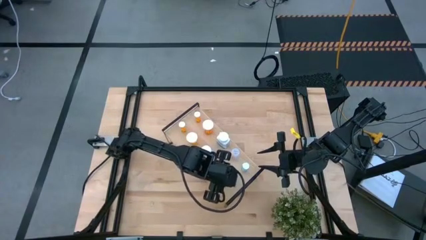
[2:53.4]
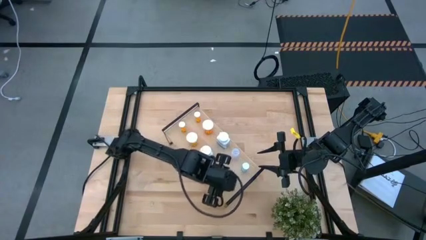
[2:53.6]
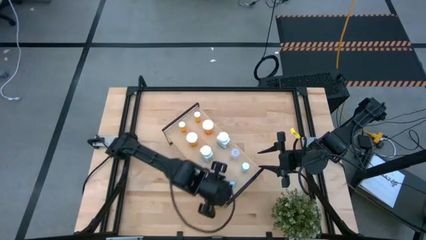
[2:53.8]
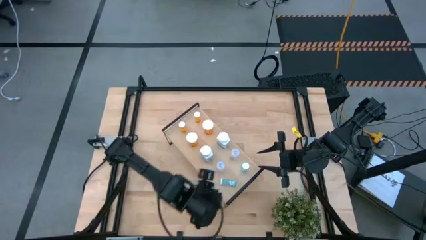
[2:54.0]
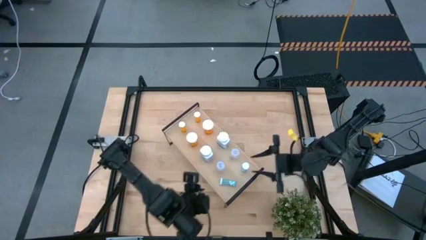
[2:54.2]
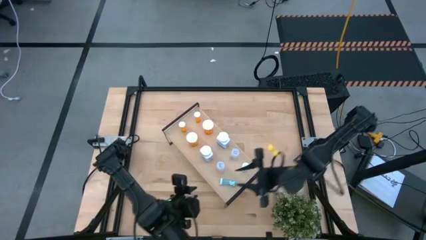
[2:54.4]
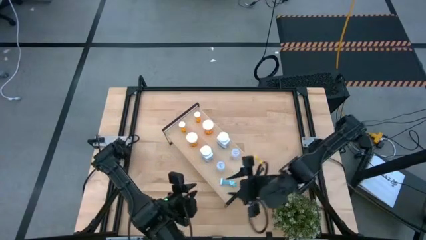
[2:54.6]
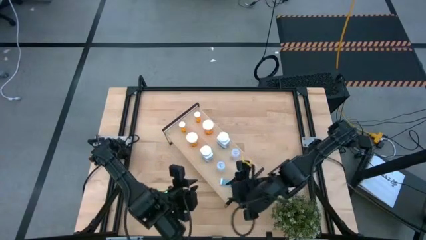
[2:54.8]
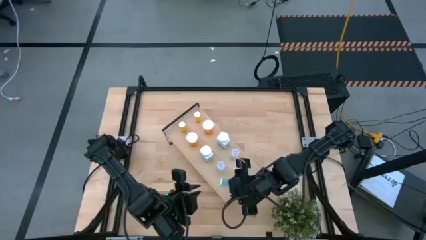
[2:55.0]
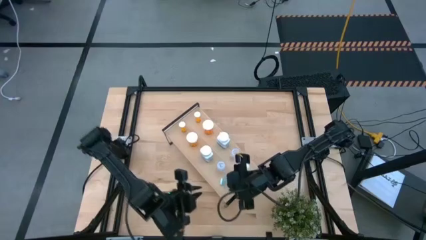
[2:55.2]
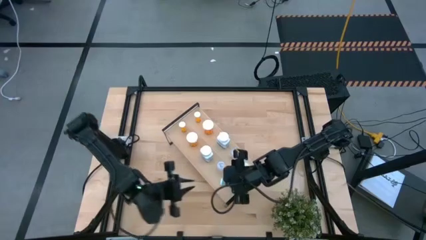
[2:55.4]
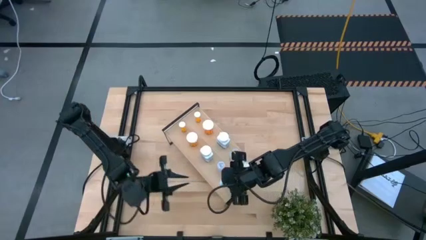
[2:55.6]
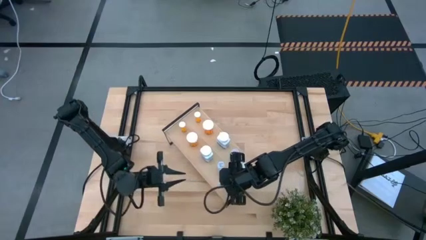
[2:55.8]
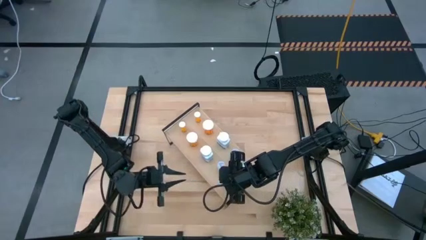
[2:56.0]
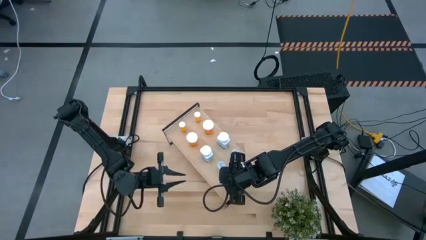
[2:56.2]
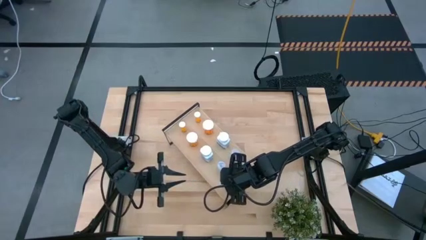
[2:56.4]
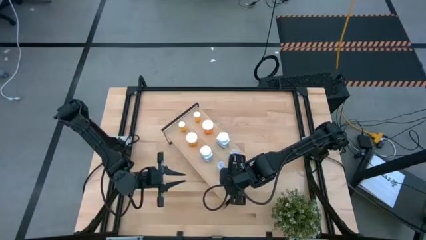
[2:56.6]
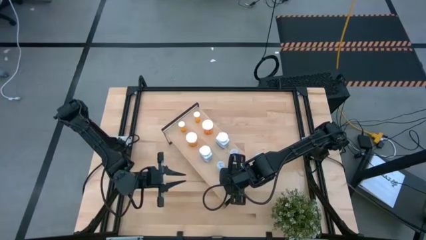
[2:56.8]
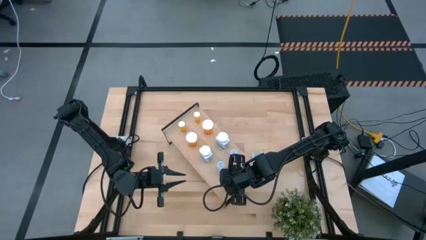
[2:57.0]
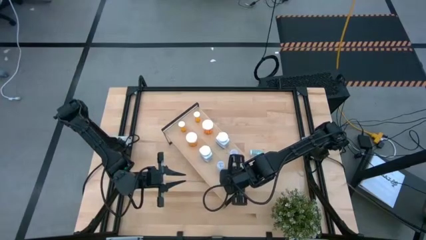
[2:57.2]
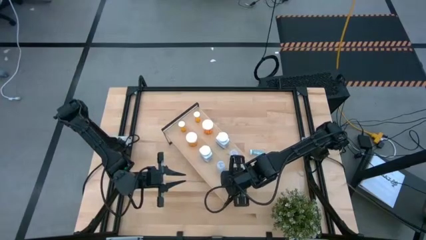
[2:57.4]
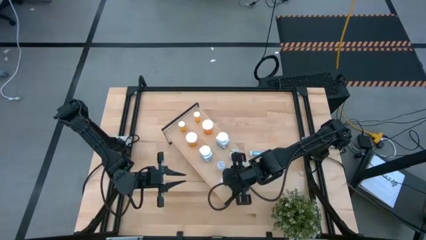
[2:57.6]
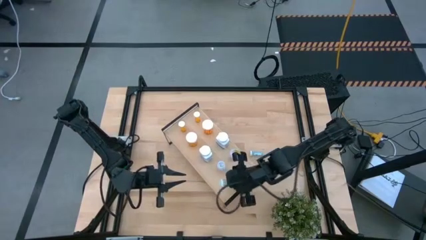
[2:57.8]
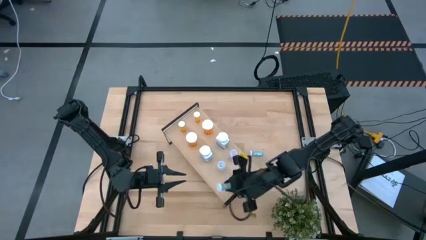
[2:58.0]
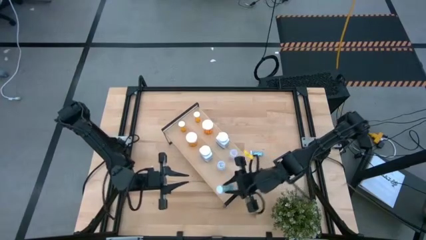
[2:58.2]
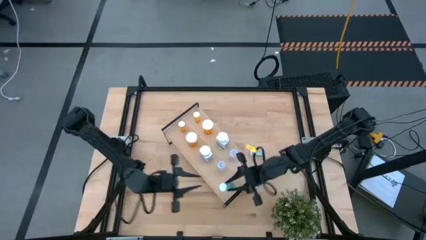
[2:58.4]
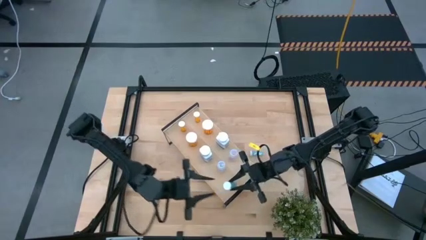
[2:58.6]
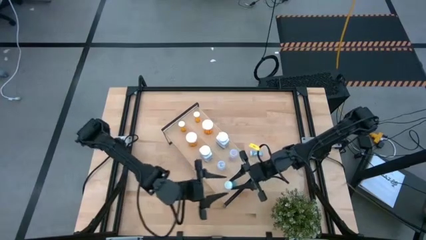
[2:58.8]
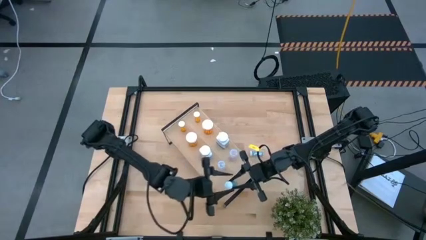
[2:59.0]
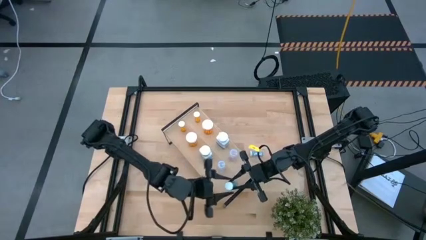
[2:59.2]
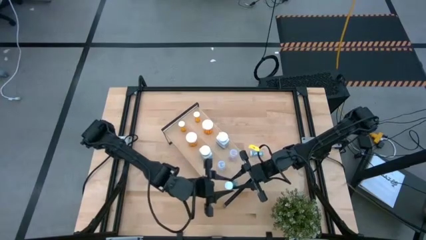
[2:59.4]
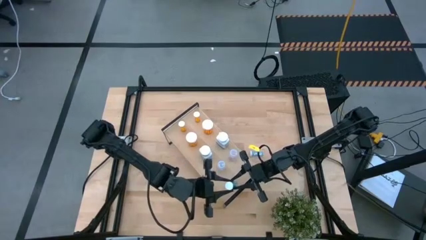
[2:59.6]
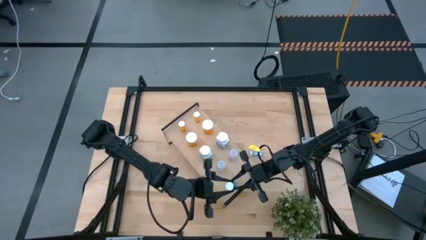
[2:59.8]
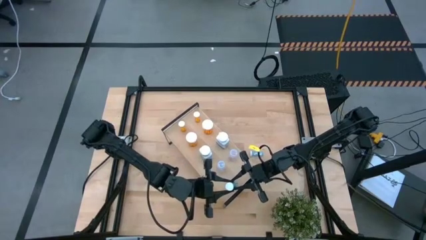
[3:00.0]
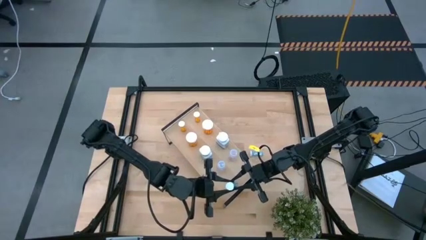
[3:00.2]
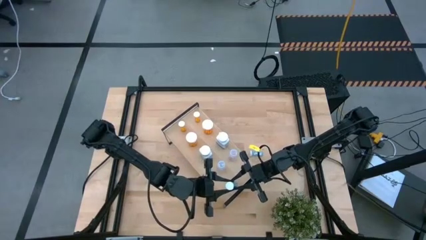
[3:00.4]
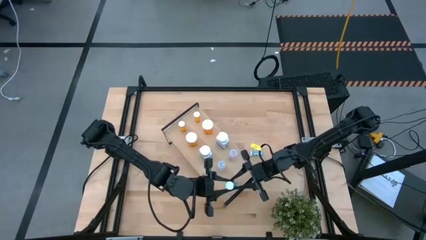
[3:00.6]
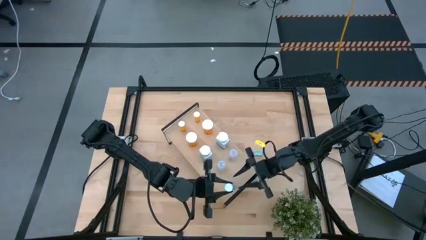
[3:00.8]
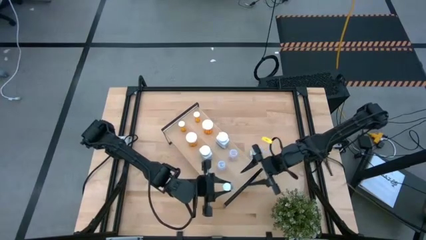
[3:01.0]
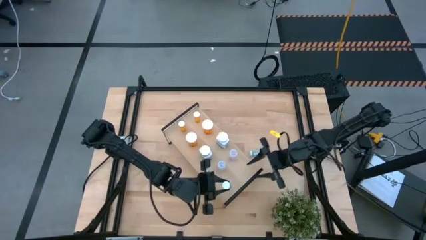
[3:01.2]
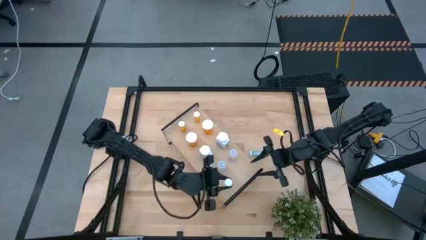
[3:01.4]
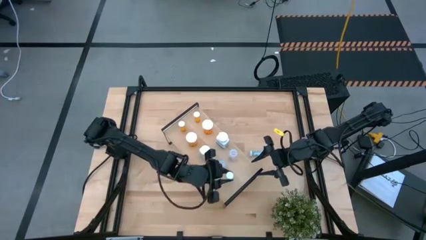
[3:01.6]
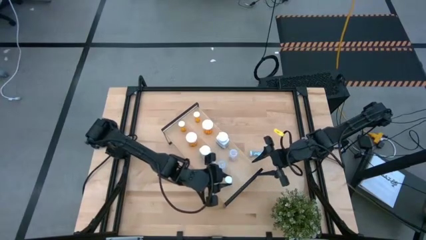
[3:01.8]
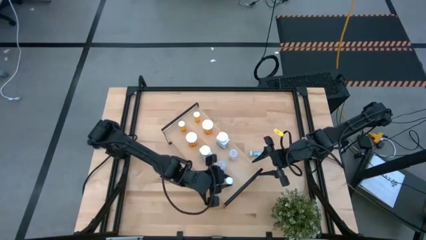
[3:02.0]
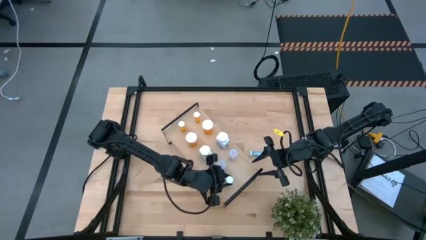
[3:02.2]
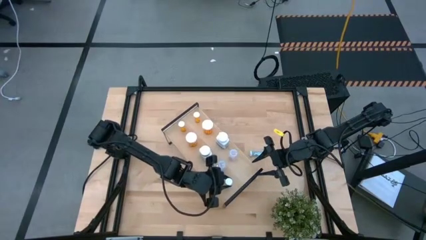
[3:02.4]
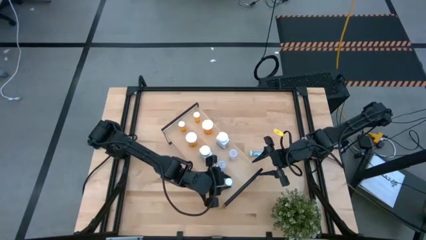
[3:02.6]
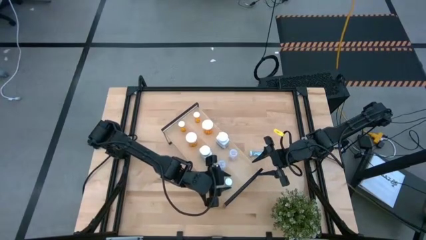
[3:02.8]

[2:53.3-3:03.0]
Task: Pick and place medicine bottles onto shelf by color
Put the blue pill bottle on the shelf aligned with the blue pill bottle

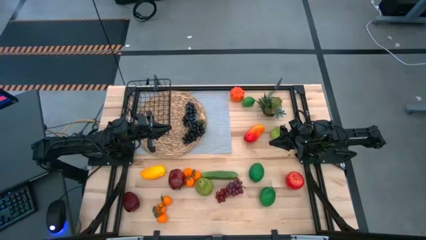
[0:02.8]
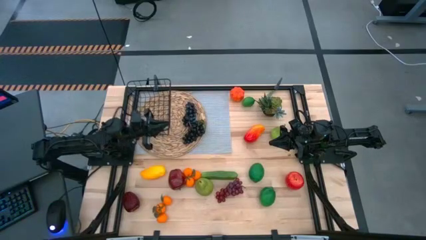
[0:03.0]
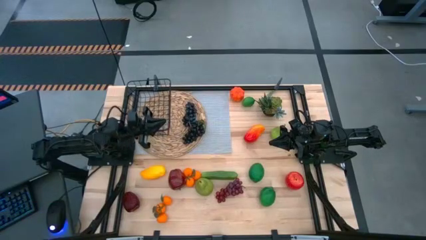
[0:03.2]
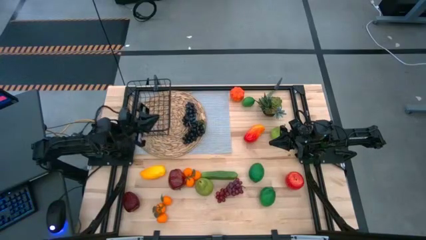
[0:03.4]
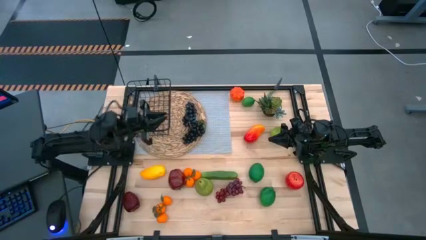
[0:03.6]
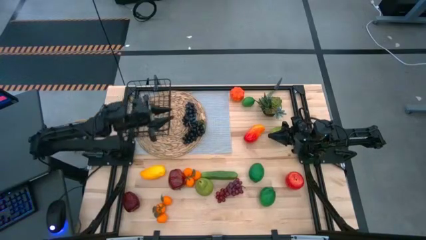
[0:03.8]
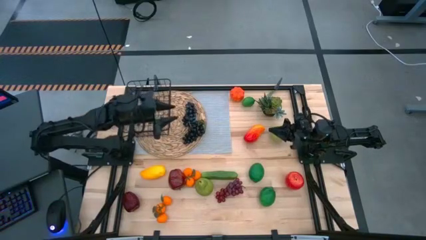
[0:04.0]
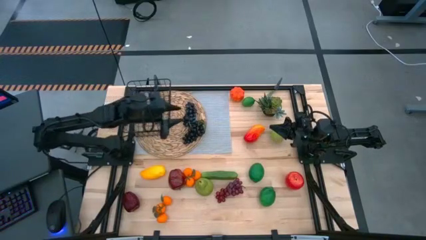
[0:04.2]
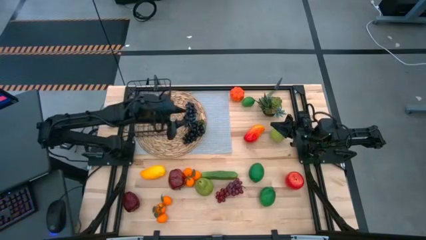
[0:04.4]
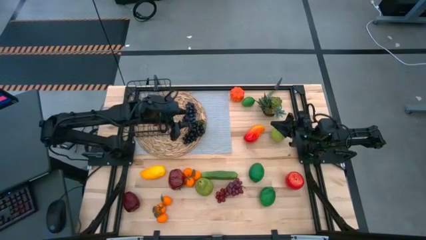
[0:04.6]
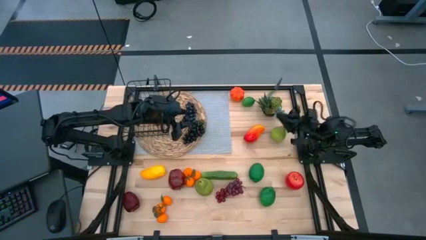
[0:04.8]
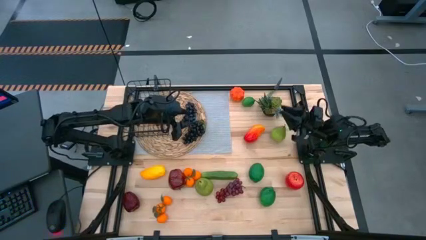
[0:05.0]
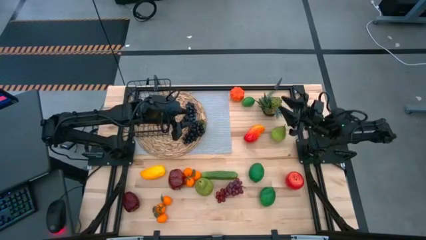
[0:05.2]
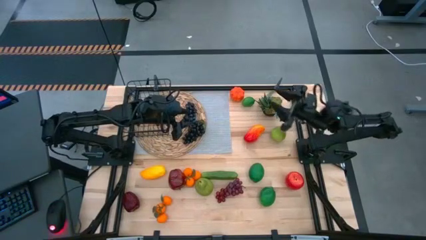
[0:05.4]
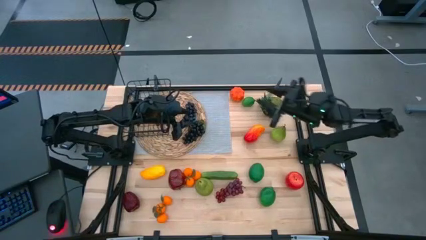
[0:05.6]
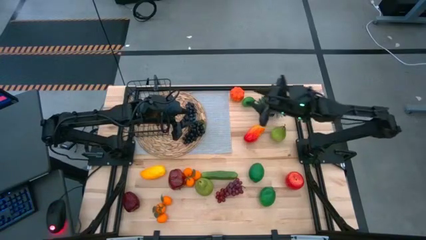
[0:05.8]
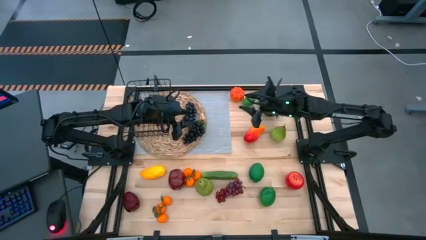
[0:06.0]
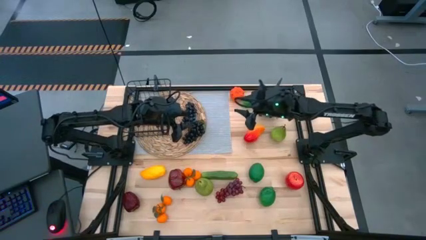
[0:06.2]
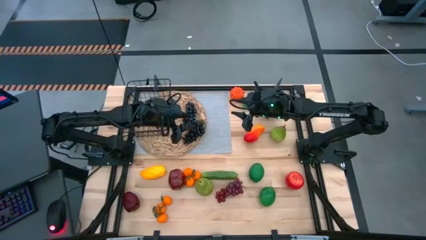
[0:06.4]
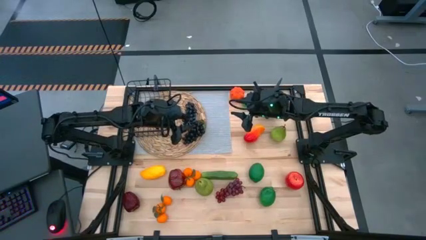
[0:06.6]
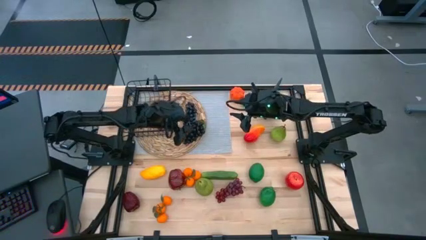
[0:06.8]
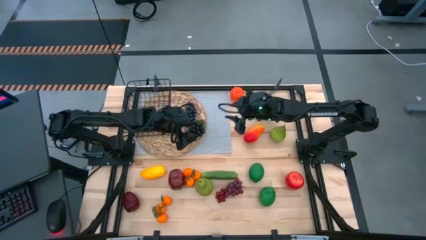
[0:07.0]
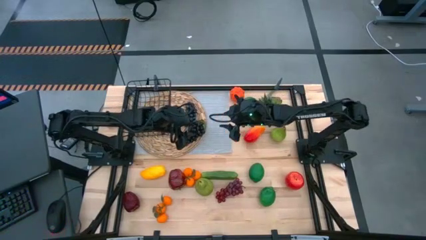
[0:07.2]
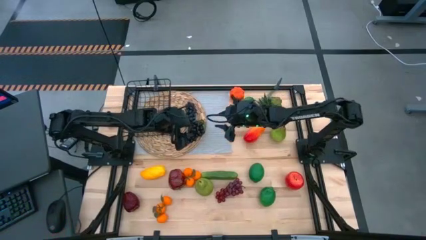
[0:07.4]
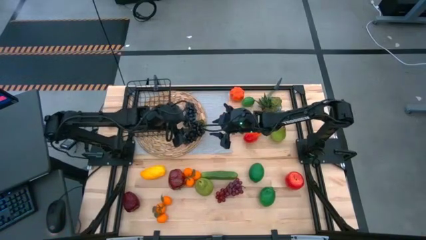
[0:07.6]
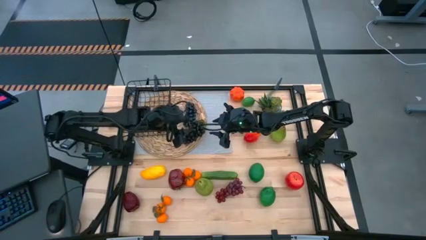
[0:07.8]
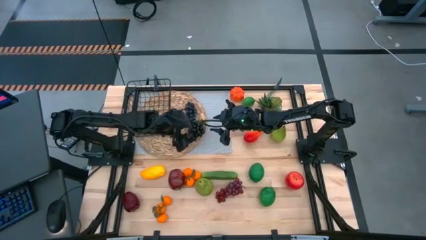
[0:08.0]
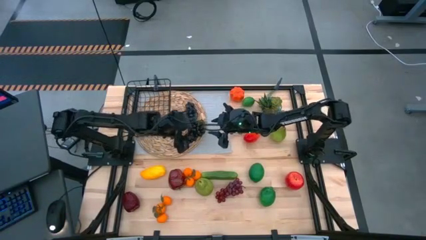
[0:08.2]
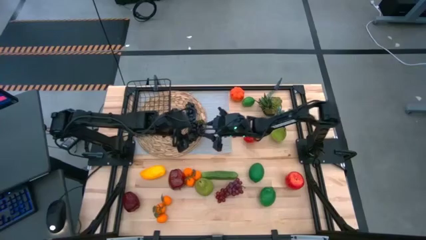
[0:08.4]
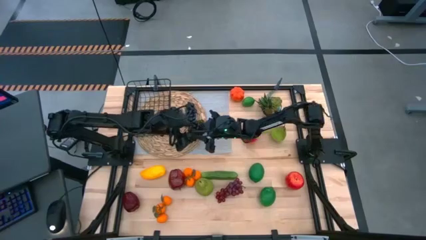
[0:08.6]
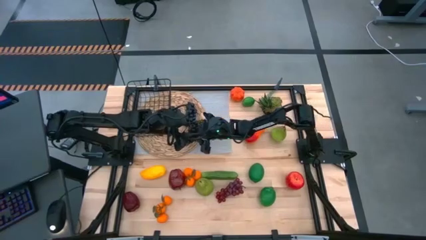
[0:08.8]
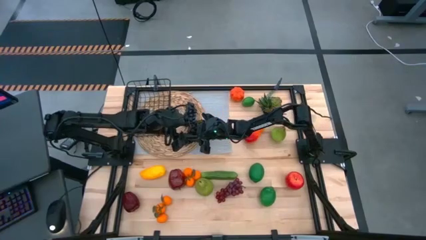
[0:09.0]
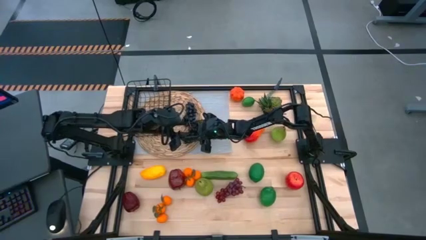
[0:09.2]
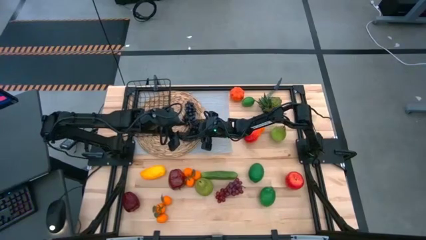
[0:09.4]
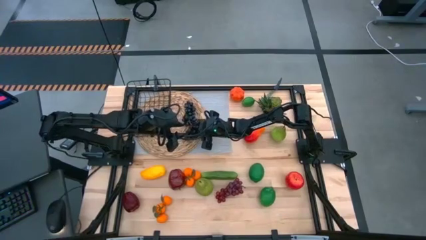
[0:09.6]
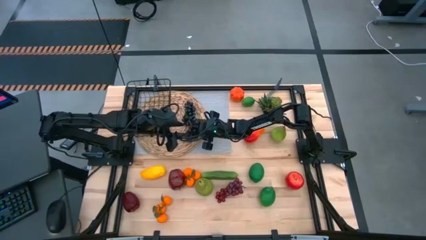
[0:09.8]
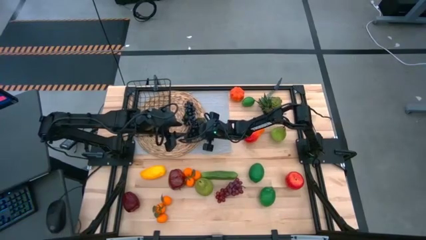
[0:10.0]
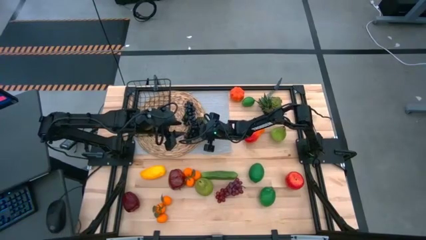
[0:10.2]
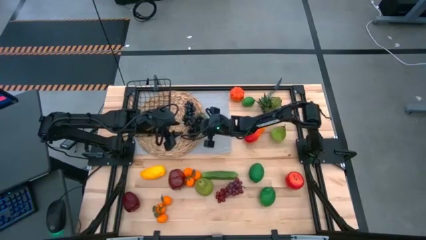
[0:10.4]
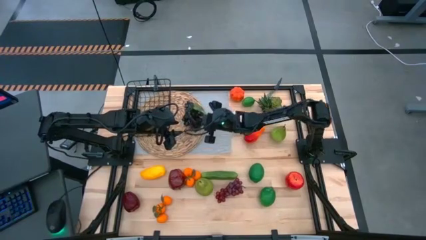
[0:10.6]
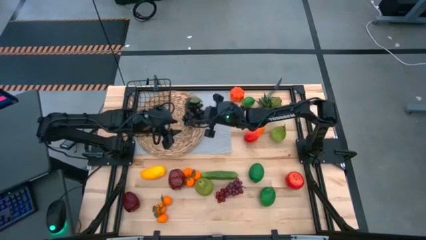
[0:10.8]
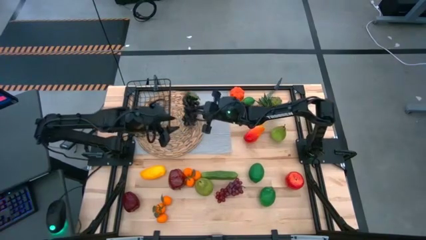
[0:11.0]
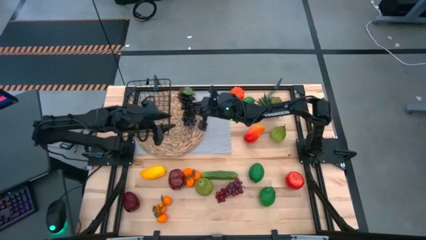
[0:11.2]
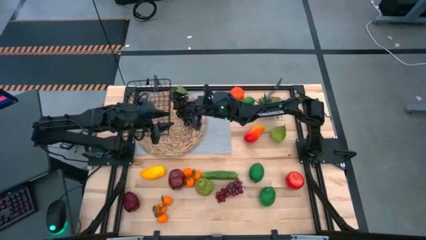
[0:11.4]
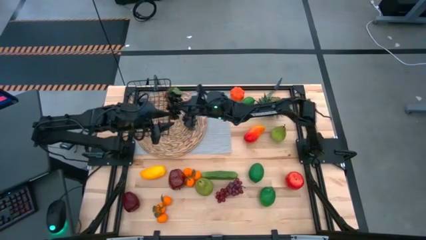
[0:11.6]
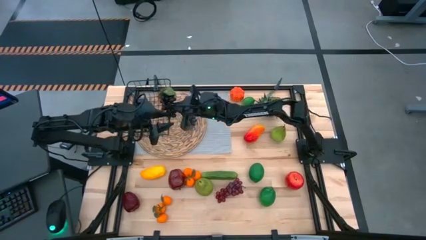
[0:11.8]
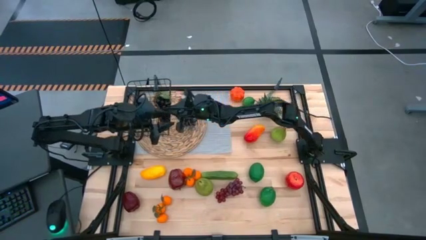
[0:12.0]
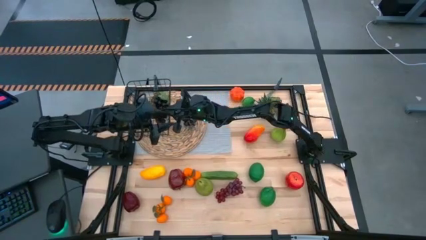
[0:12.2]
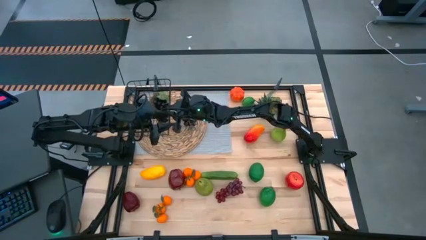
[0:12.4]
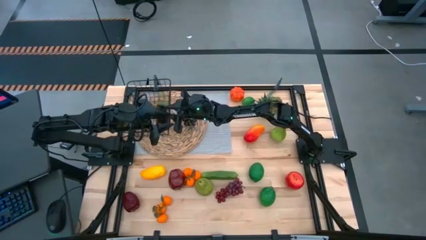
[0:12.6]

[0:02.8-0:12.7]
Task: Build produce basket
Put the bottom black grapes into the wire basket
